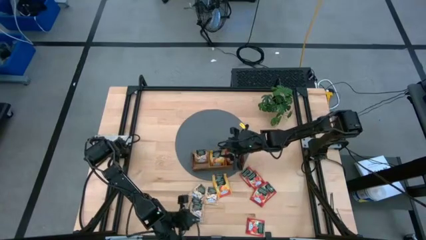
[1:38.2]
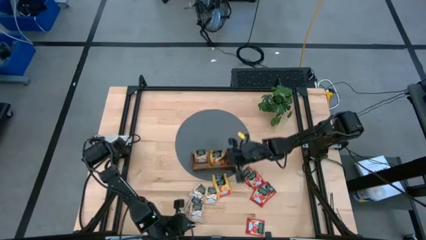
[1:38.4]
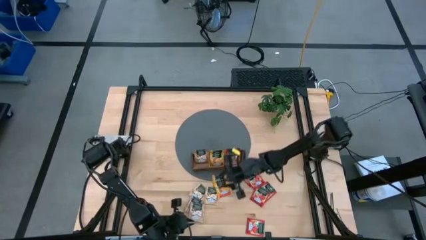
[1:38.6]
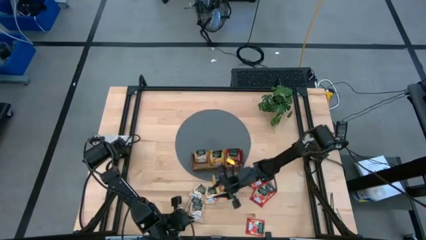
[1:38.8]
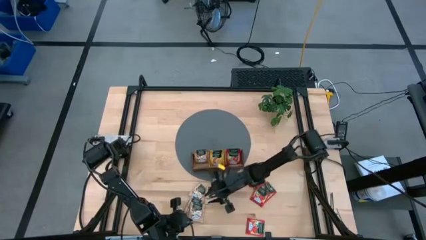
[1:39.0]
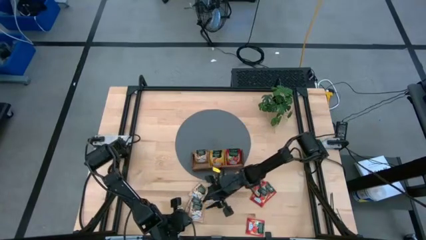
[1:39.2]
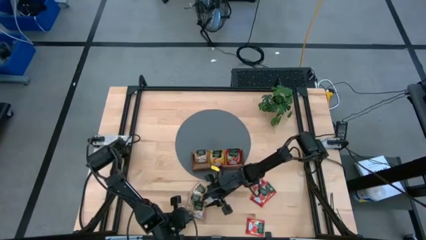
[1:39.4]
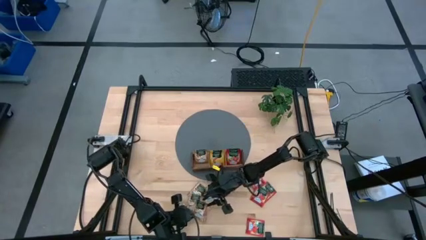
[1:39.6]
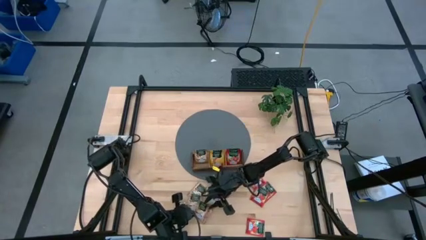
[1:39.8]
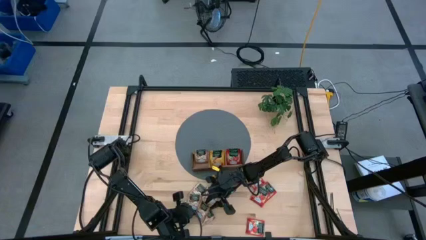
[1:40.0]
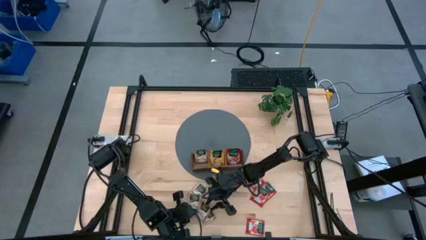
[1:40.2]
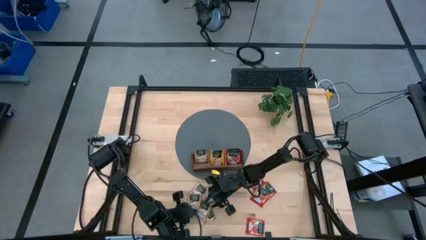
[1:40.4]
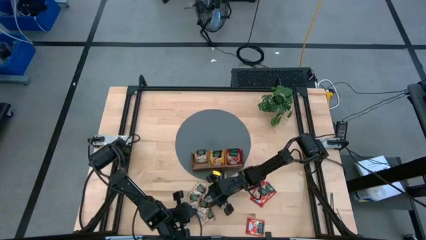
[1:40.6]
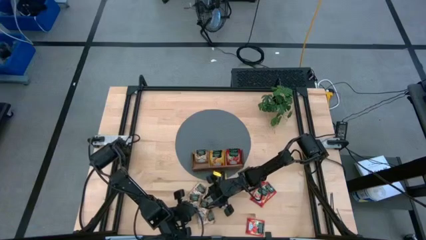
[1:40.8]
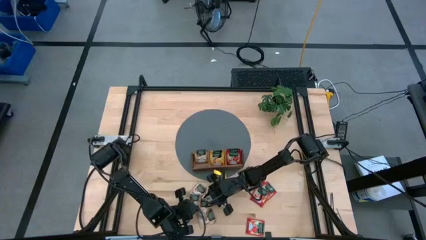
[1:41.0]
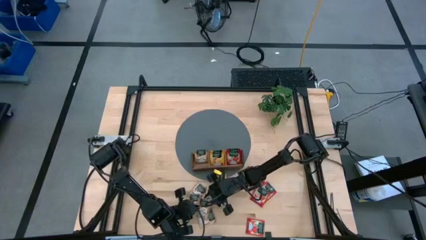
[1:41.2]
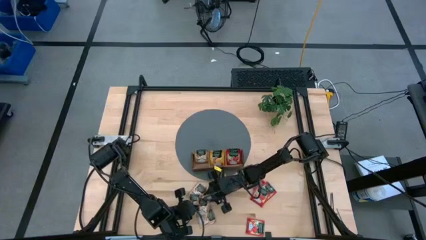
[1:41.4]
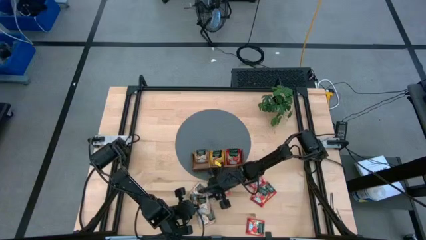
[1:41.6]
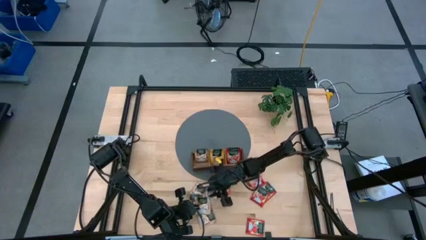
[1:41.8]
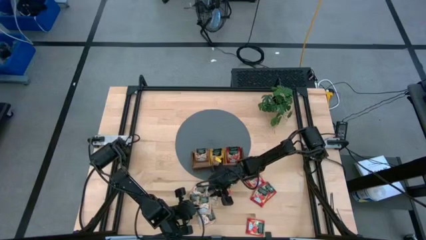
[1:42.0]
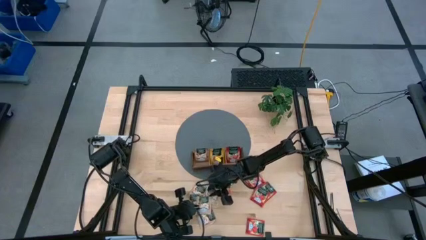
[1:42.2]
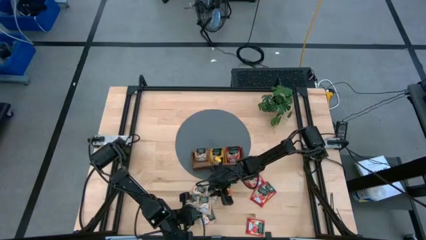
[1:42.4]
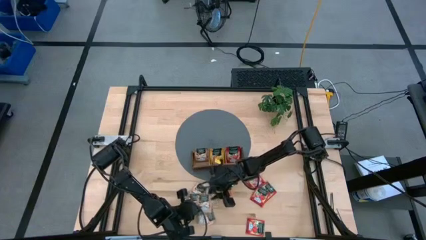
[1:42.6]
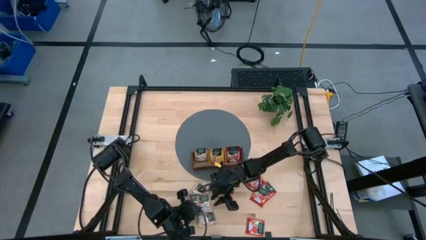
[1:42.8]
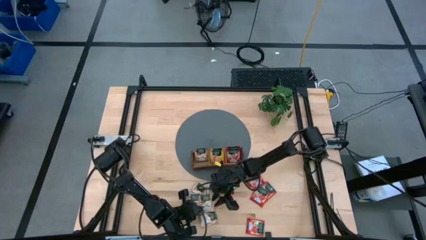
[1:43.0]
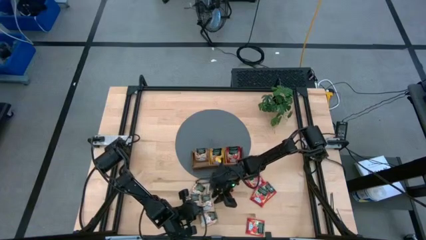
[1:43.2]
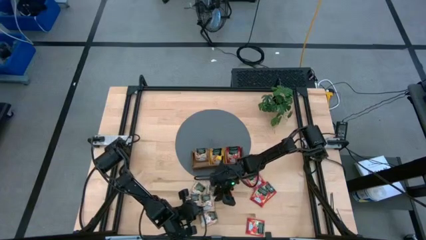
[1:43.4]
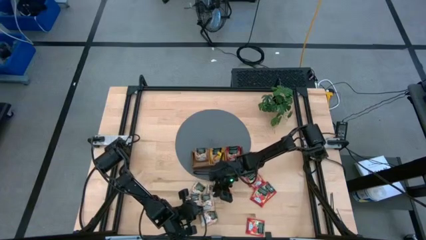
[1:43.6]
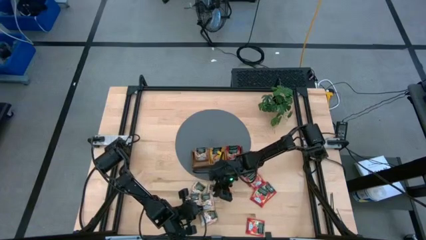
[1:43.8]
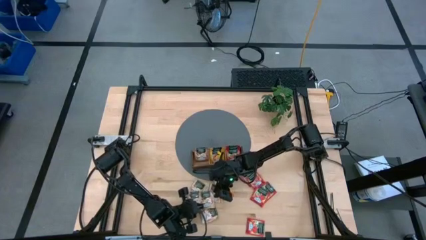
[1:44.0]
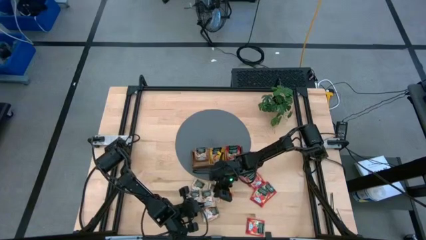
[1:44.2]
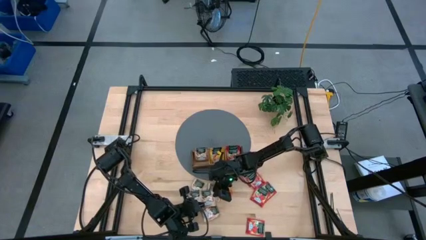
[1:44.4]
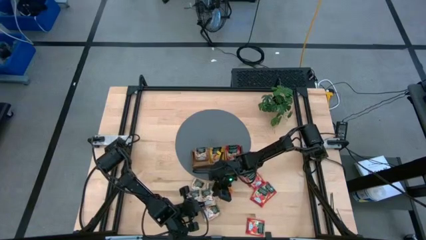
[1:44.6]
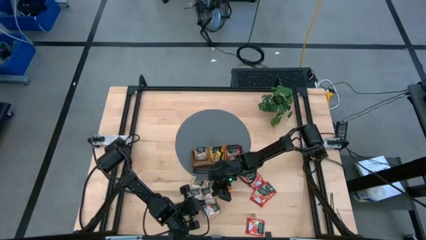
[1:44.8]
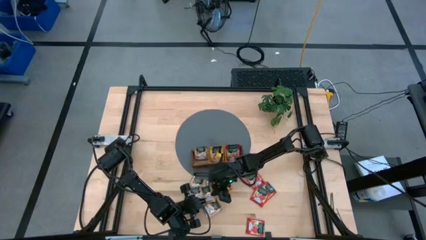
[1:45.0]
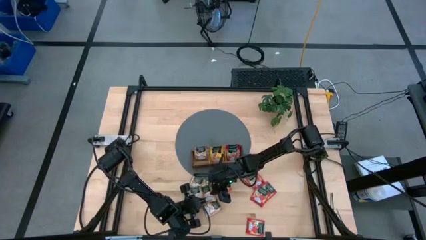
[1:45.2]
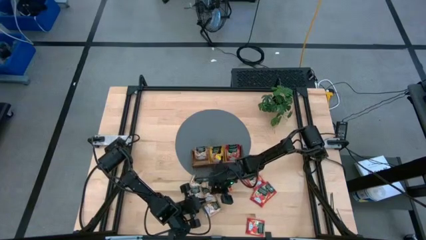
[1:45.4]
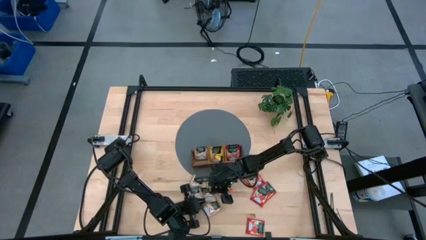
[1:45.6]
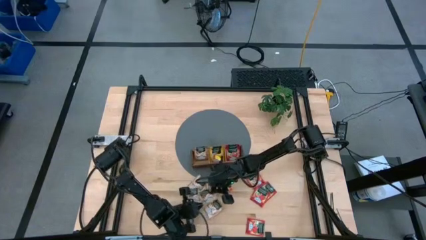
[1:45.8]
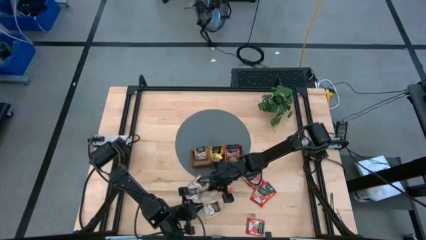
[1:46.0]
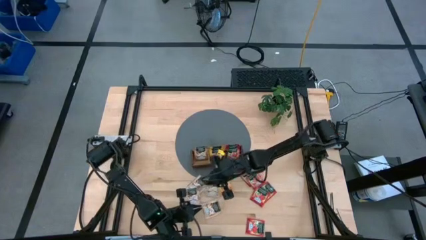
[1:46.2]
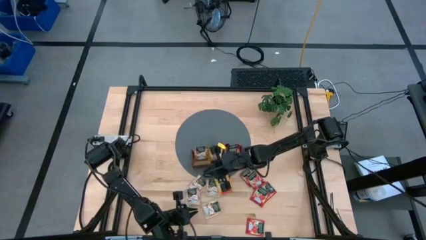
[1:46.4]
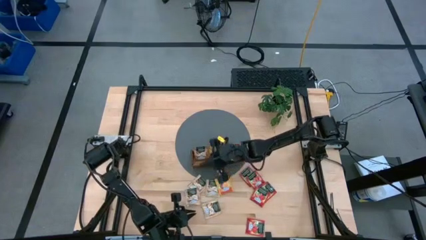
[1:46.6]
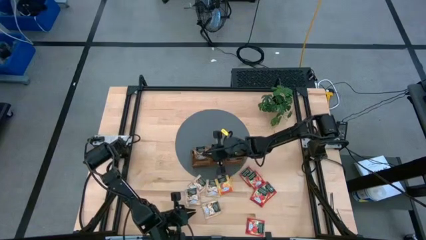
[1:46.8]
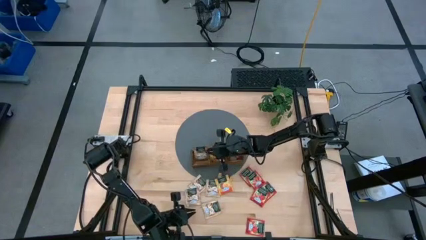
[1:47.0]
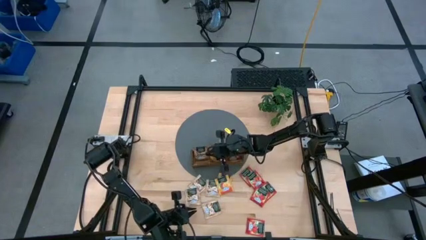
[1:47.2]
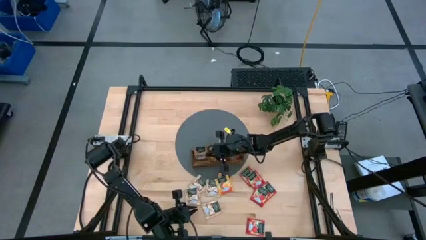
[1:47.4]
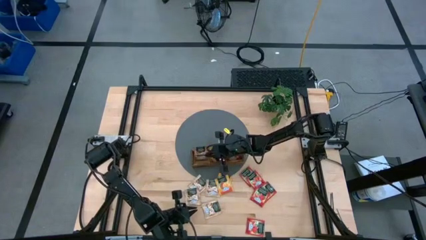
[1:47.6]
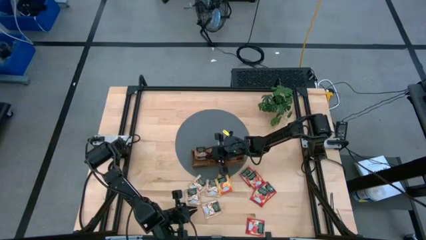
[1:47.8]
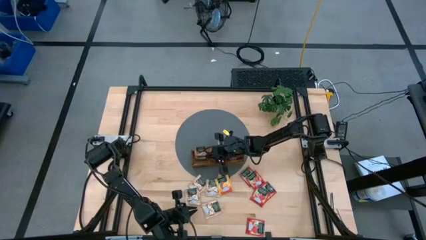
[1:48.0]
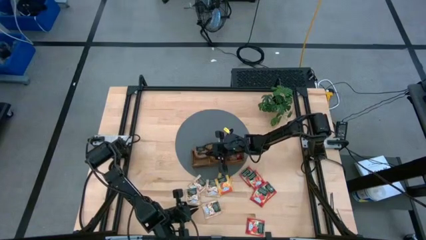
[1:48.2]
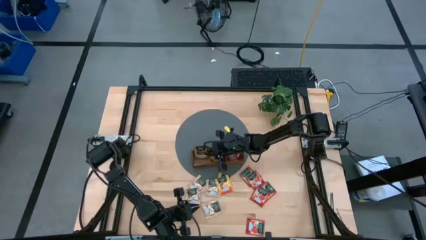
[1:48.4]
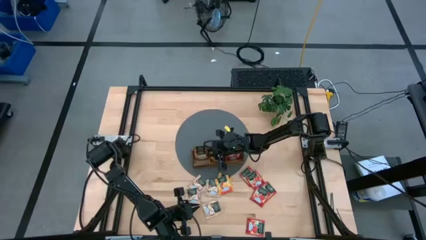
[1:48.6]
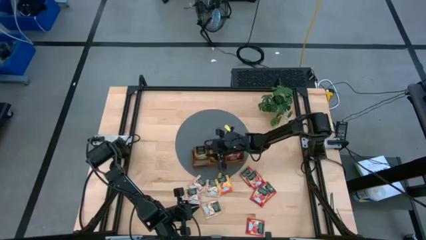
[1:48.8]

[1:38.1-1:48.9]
Task: Pick & Place Tea
Put the brown tea bag into the left section of the wooden organizer

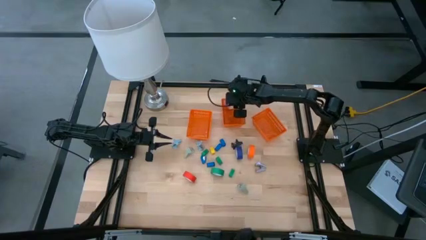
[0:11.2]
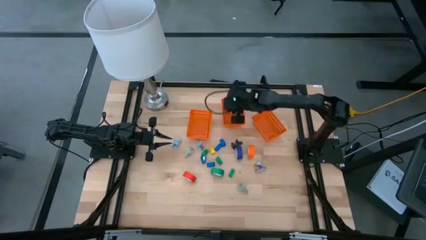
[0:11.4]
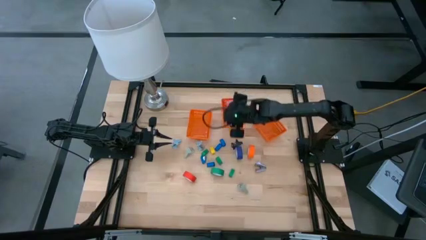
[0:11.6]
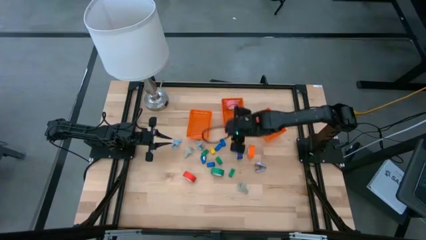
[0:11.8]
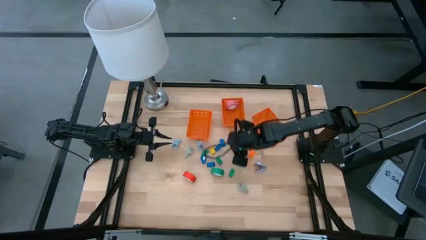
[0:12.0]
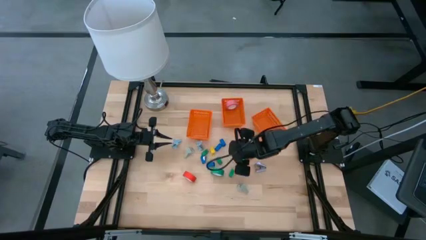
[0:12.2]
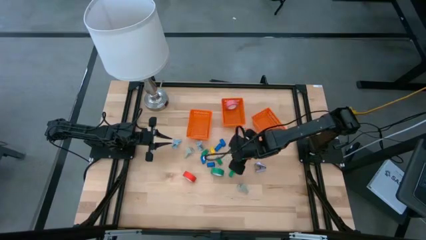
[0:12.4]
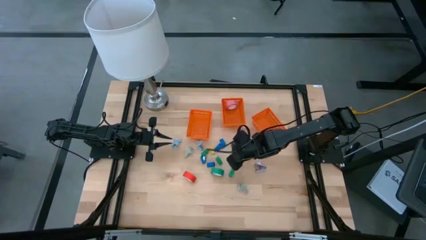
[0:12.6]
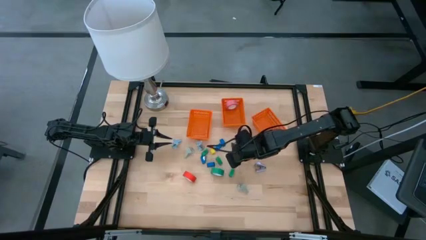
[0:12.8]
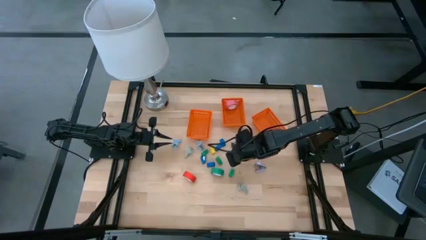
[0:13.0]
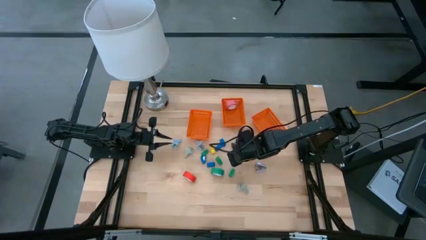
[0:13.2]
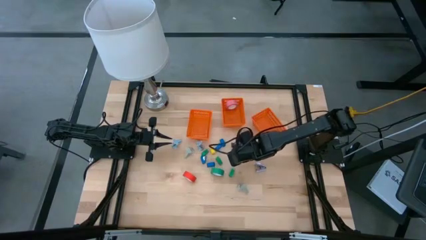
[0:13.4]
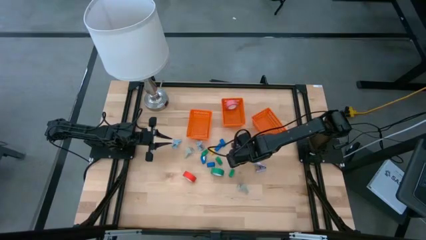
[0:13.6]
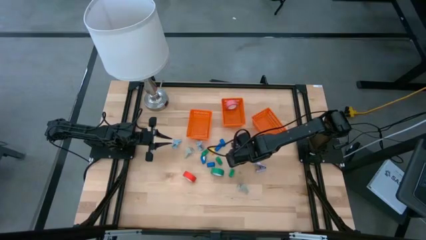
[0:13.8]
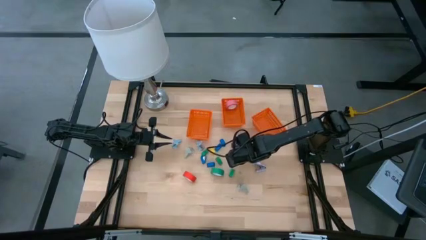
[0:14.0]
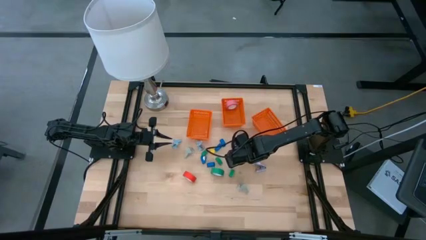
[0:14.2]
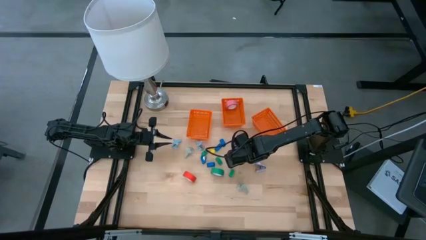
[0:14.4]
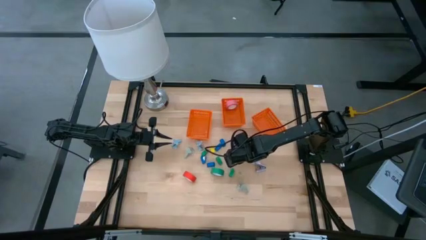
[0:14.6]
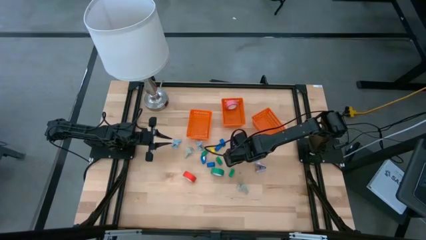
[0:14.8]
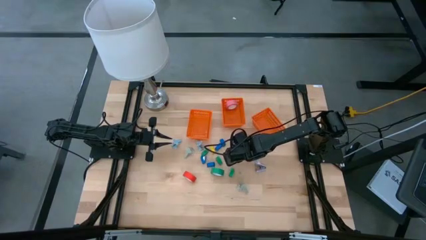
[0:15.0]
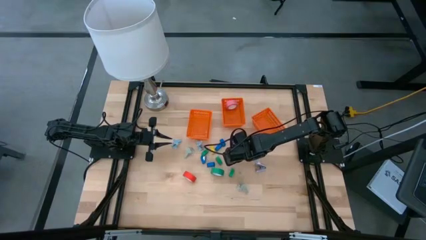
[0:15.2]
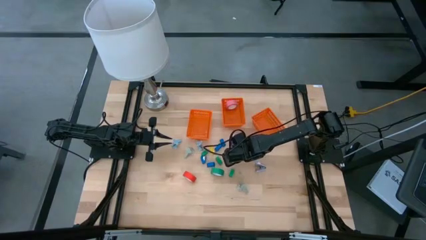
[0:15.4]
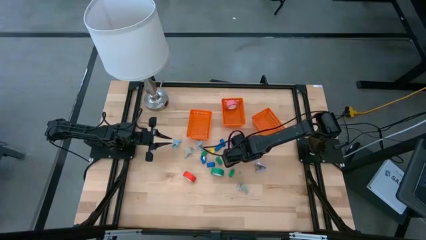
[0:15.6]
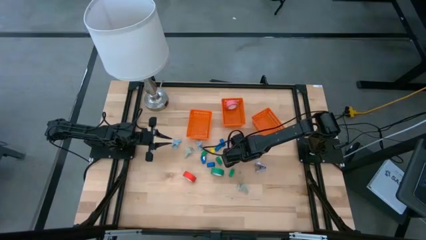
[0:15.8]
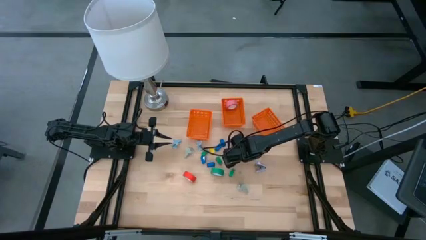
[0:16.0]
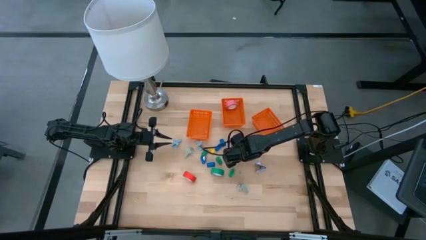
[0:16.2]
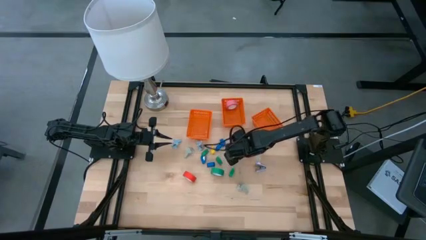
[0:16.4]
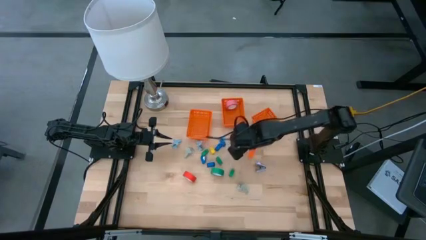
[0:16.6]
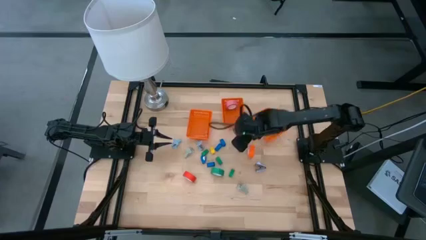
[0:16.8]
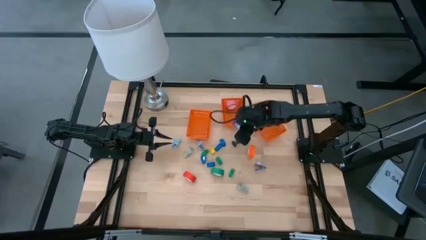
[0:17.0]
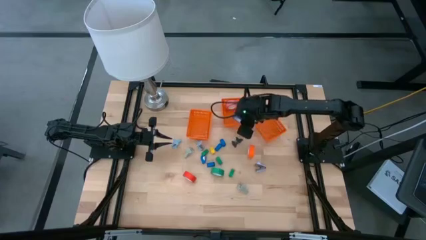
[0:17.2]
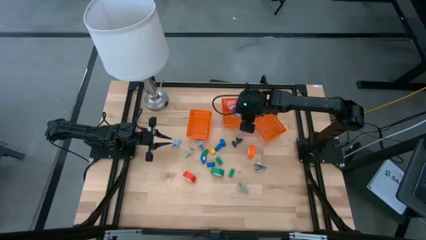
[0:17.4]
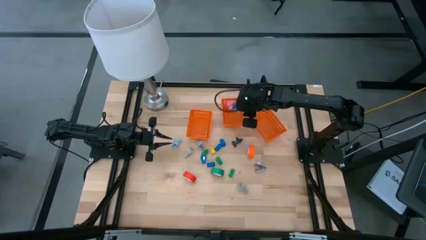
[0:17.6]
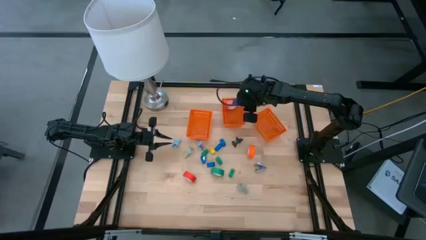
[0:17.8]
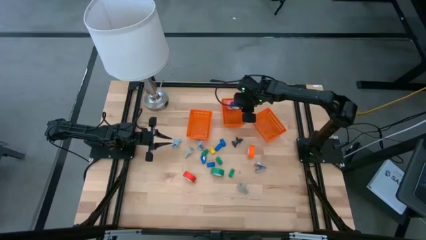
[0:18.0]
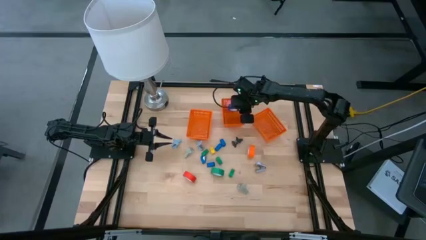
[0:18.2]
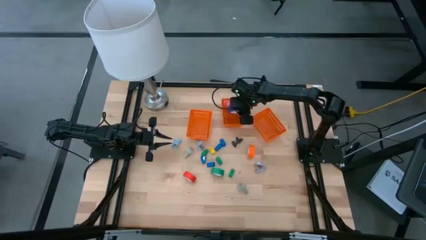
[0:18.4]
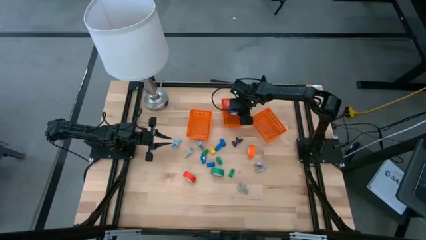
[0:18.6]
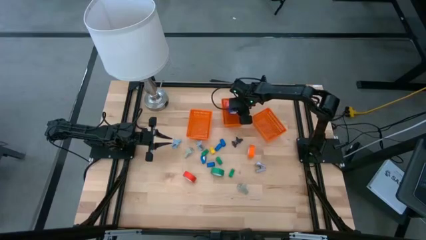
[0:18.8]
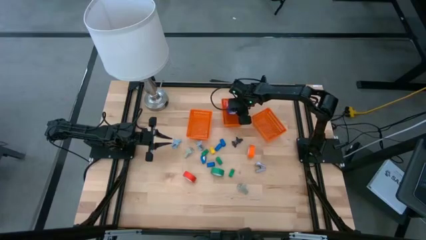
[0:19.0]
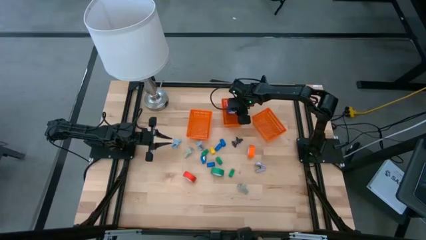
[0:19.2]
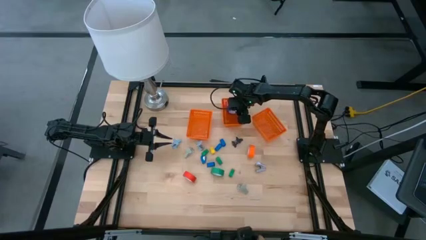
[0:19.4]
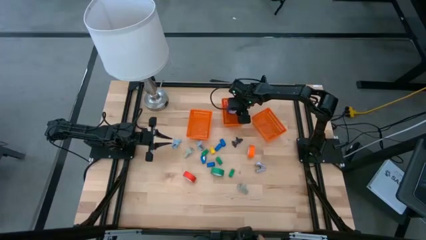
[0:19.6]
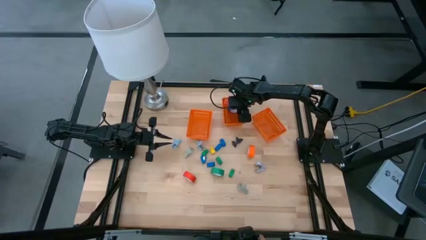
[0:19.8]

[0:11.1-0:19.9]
Task: Pick and place Stapler, Stapler remover, tape
Put the blue adhesive tape into the middle orange bin
